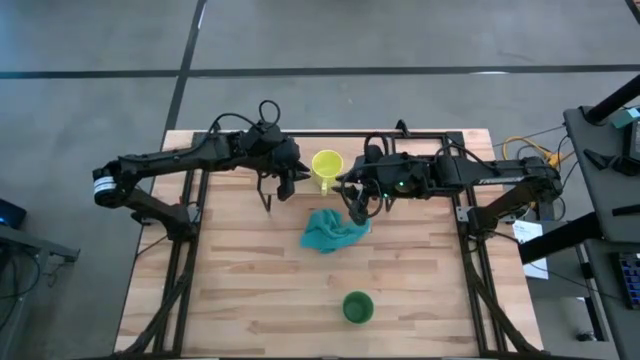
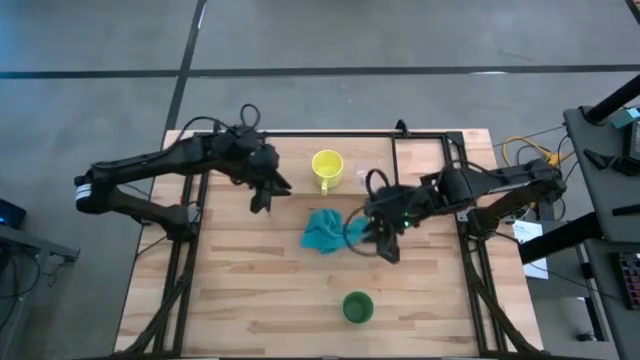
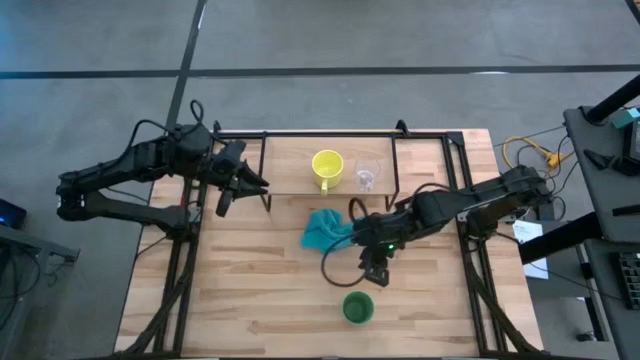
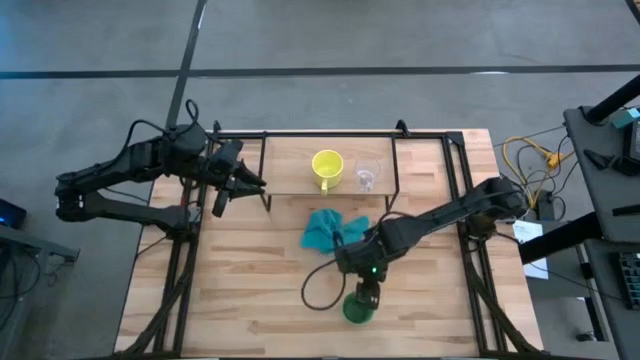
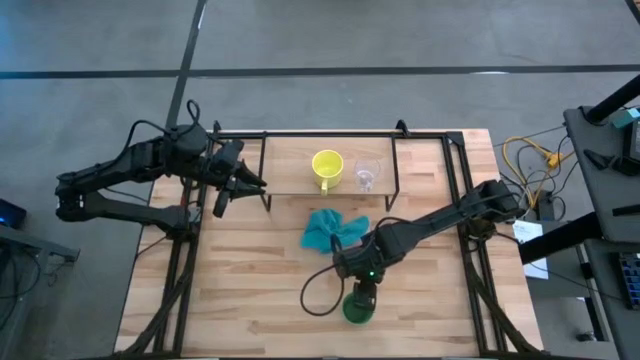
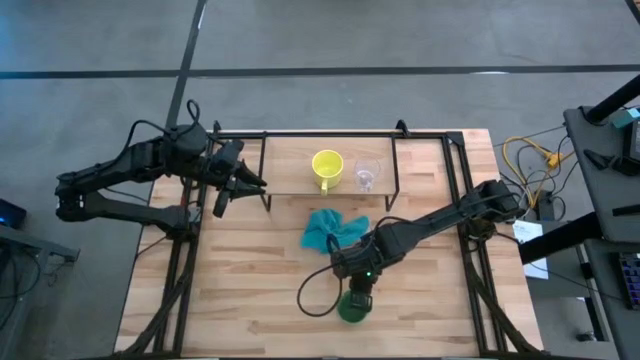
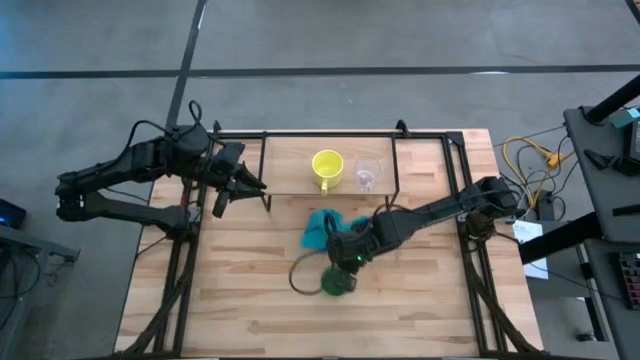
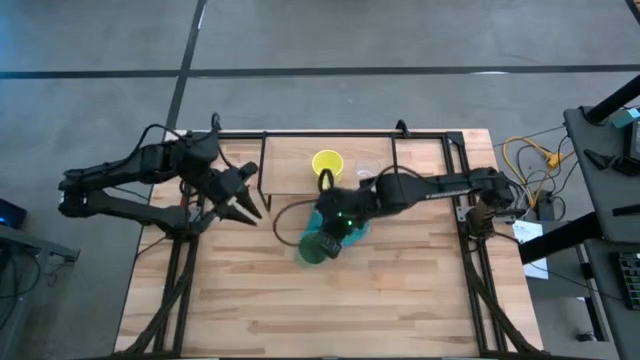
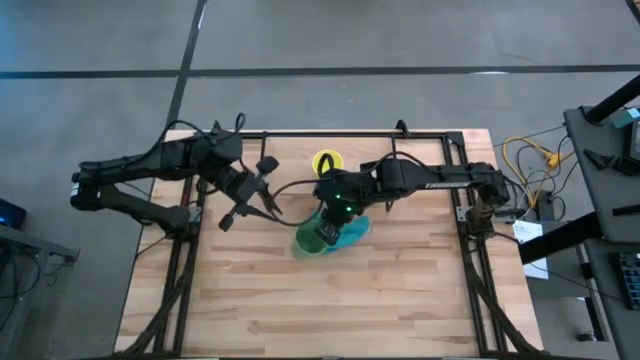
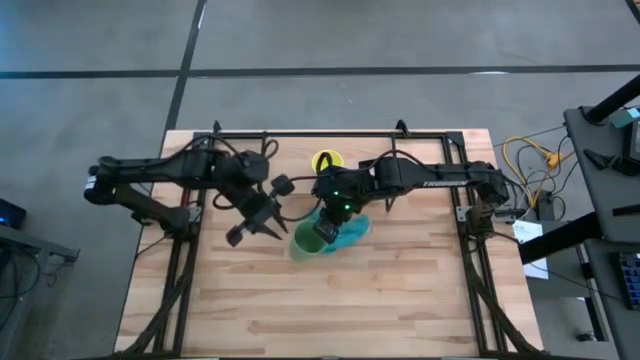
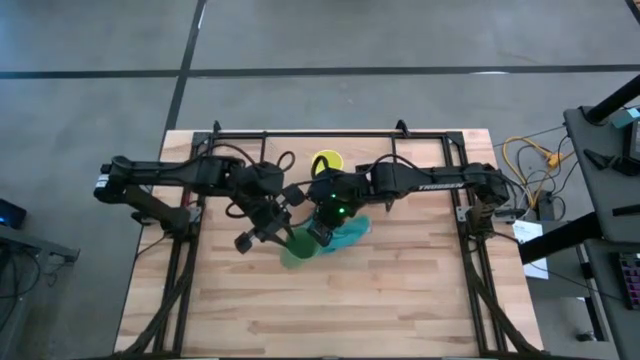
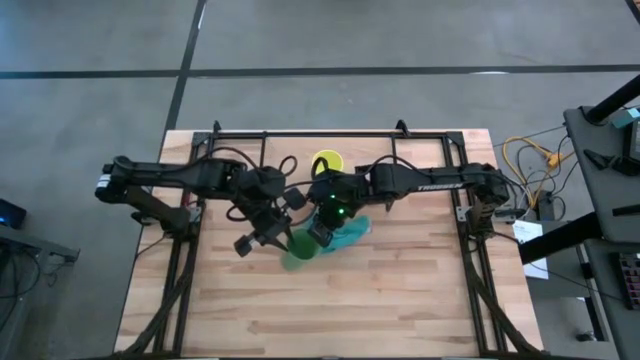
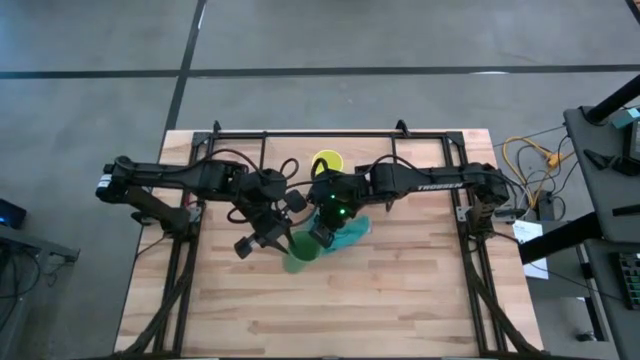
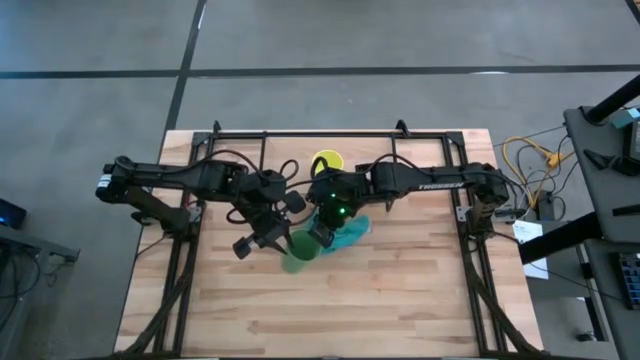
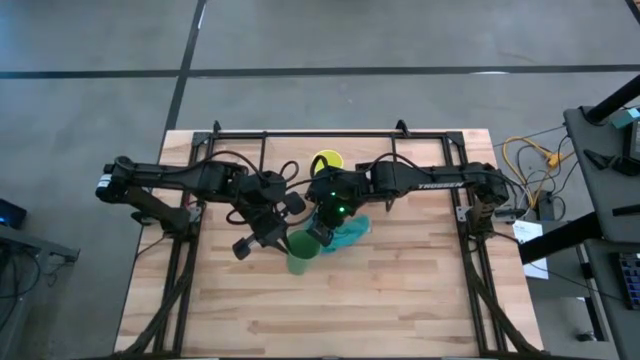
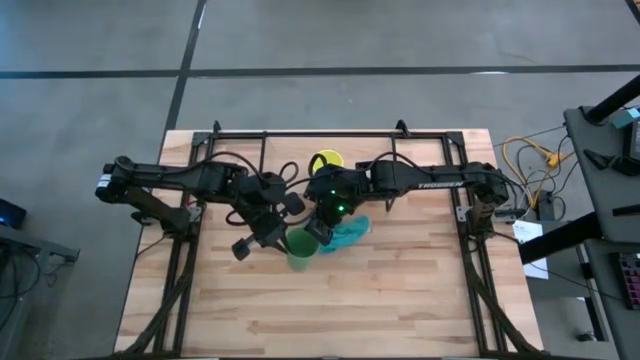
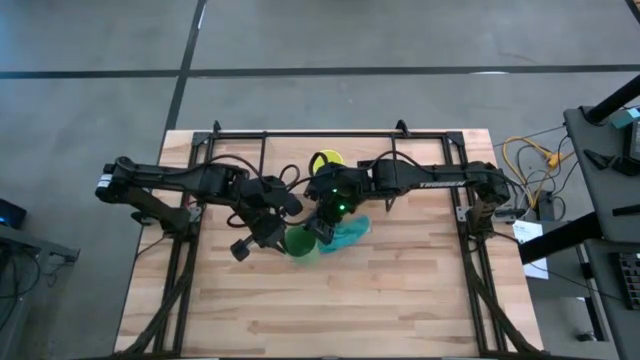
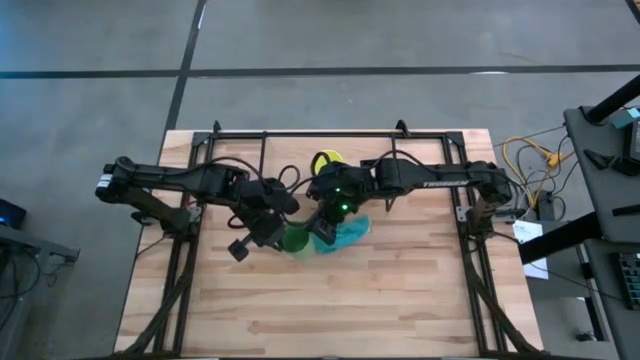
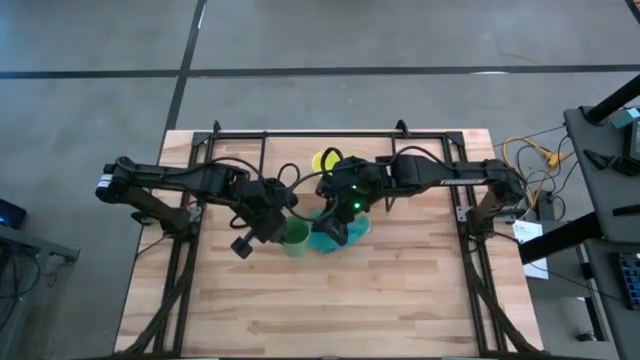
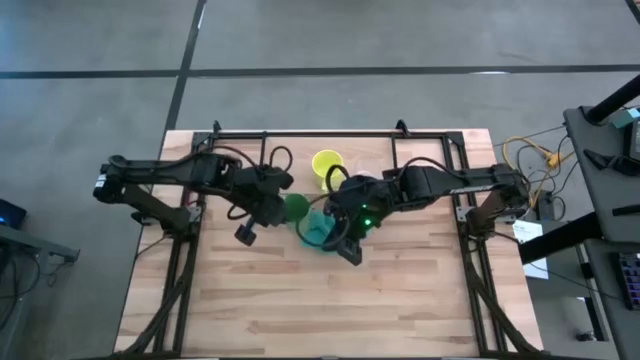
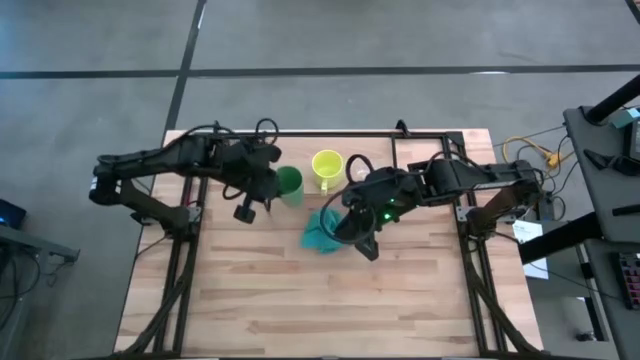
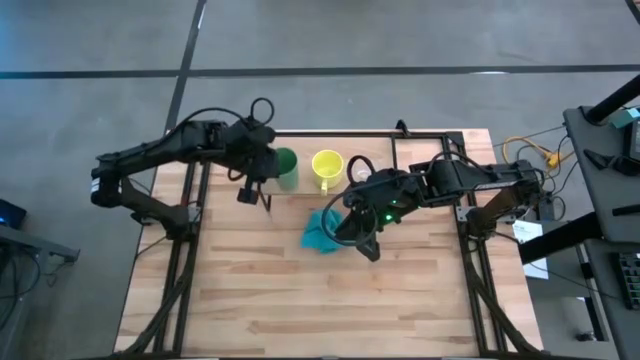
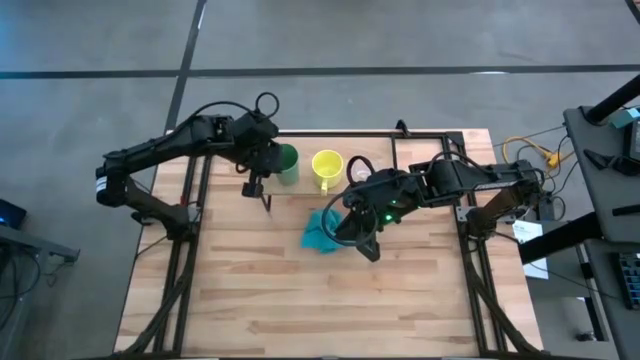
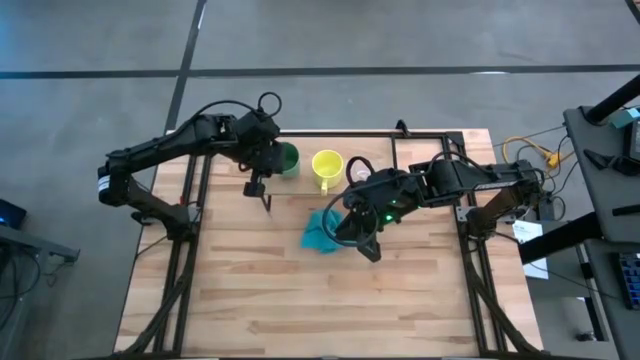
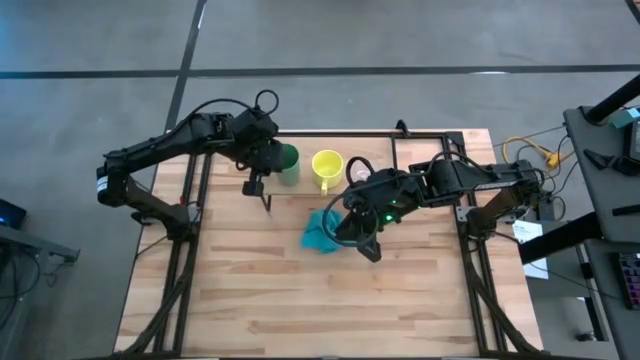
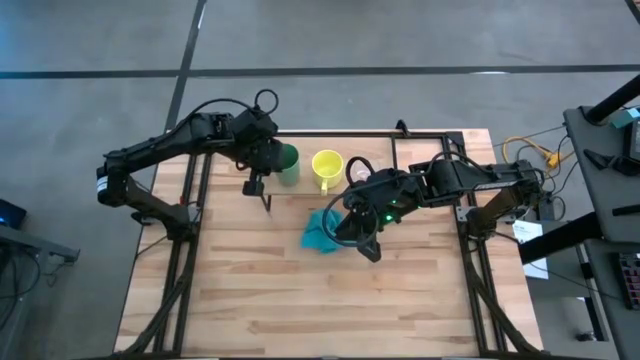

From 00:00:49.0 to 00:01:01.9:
Task: Stack small to large cups/mugs on shelf
Put the green cup on the shelf

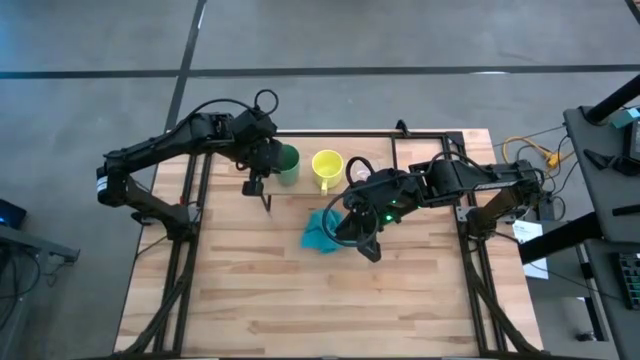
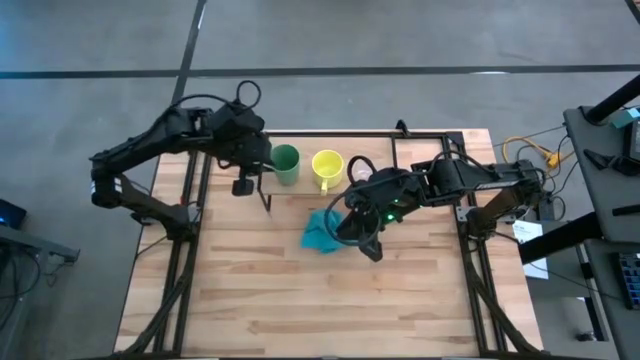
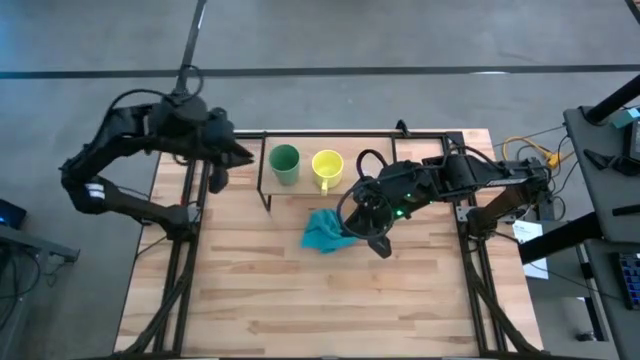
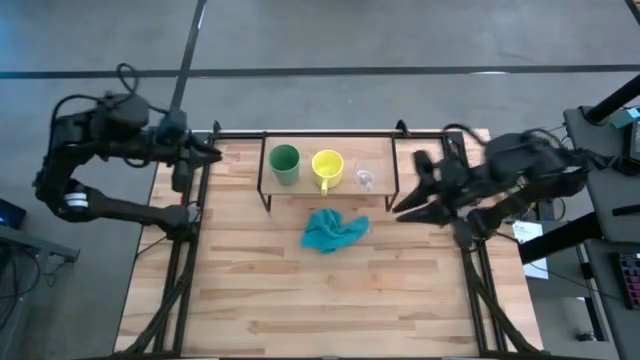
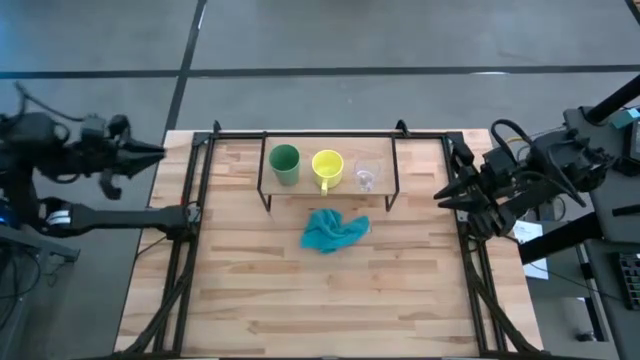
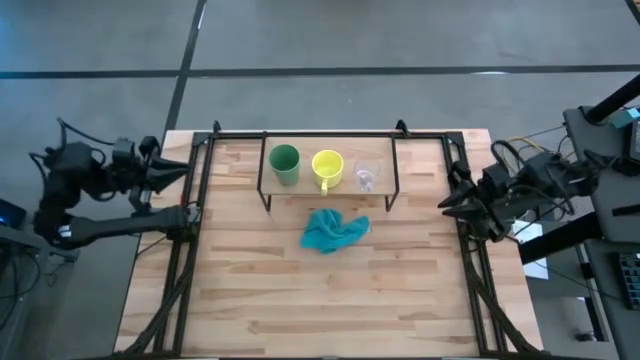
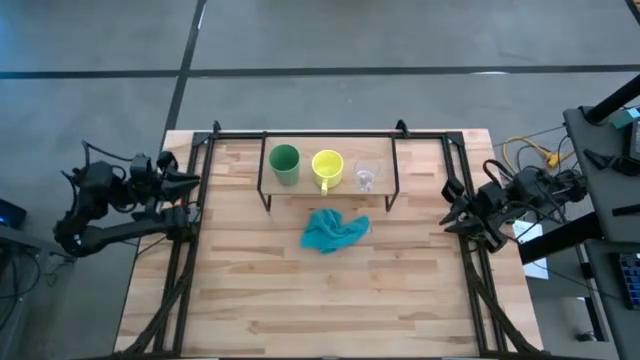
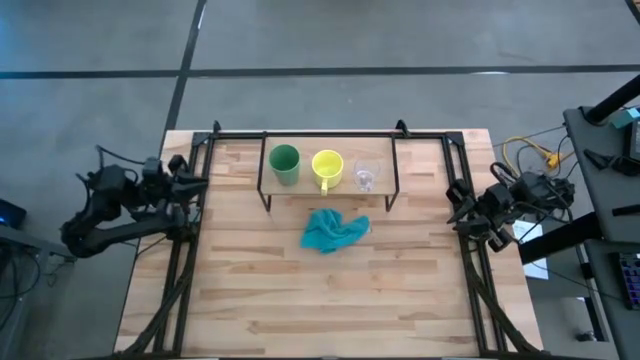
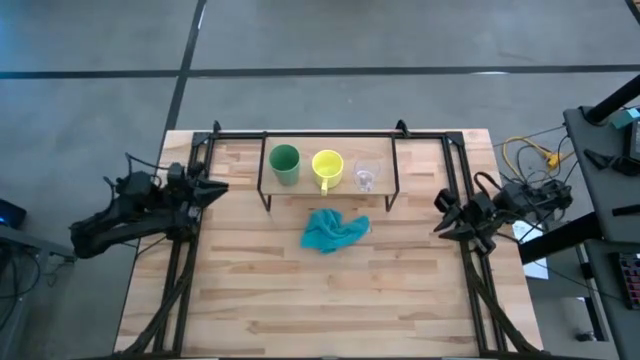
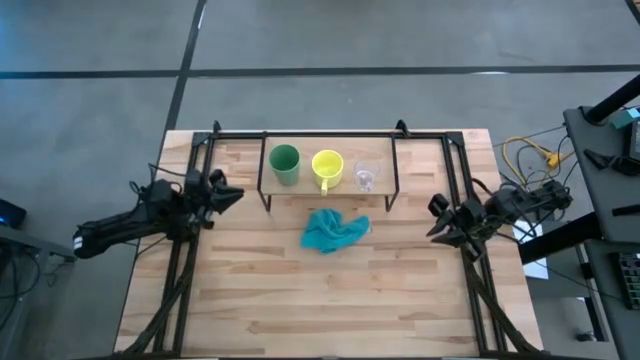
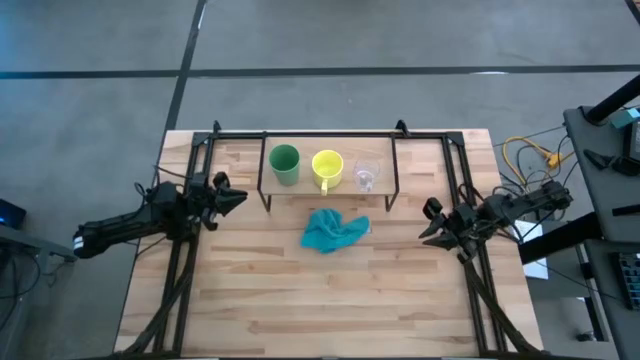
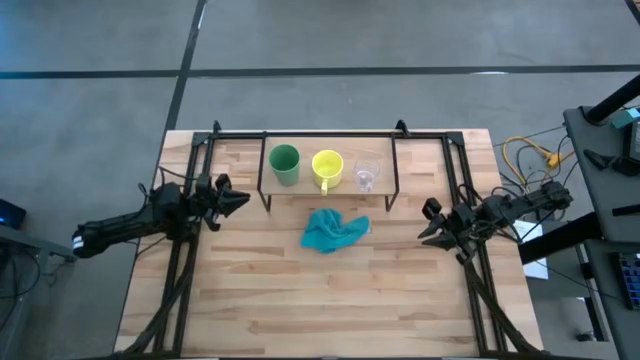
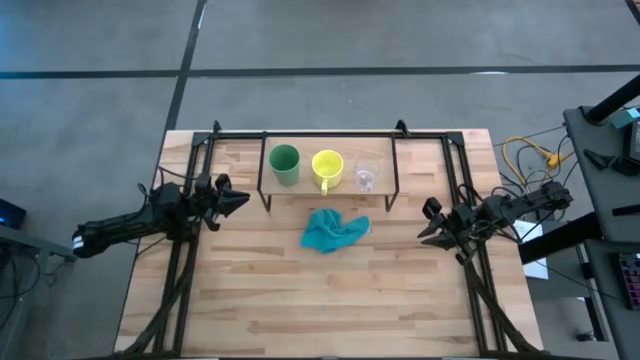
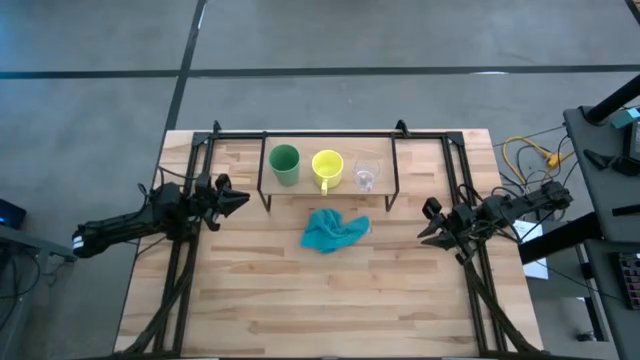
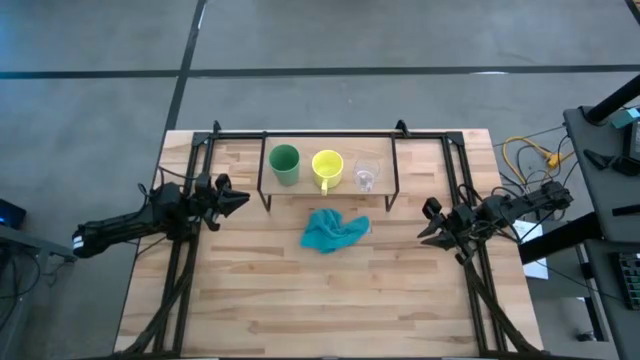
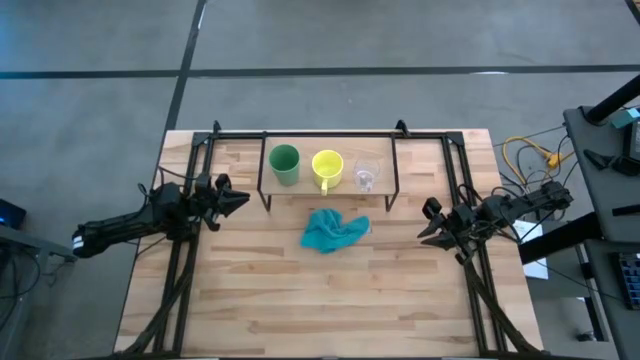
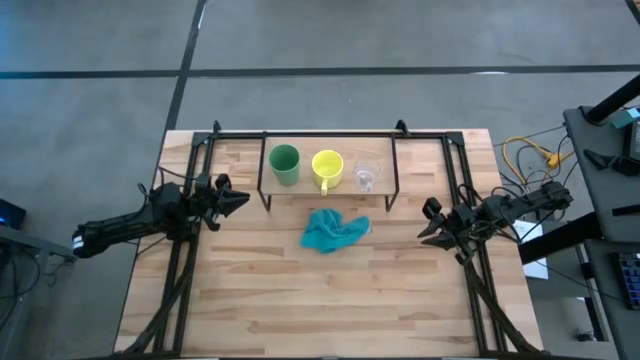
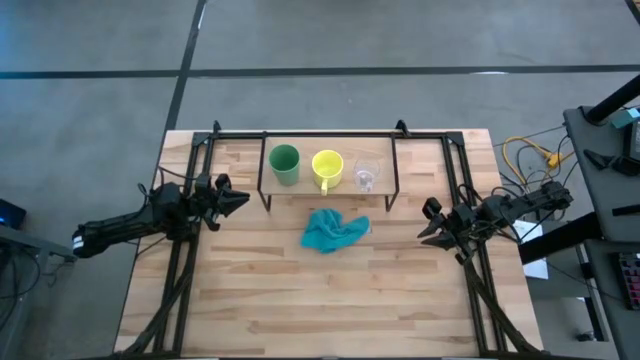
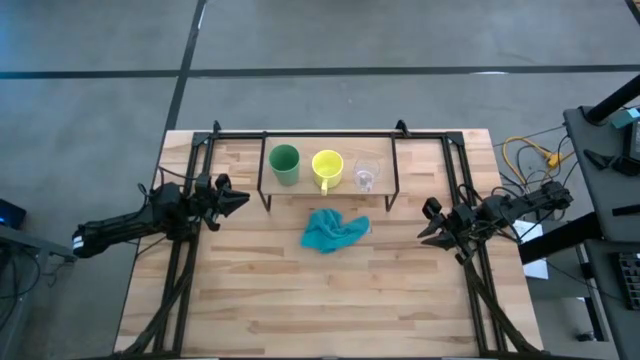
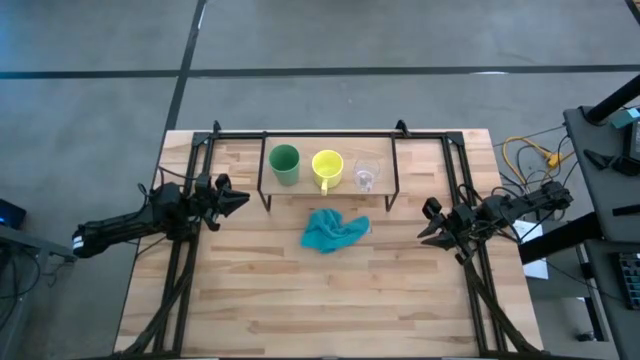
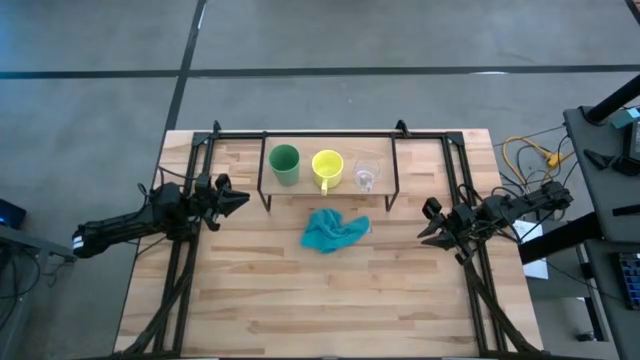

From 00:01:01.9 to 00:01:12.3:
Return to Home Position
